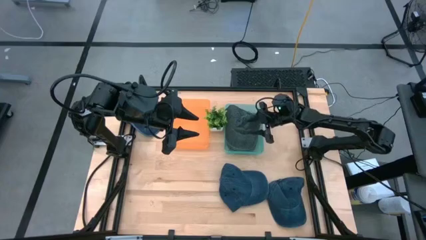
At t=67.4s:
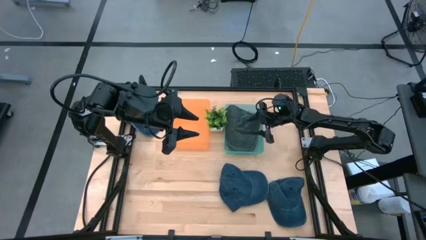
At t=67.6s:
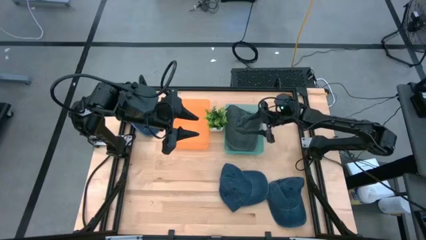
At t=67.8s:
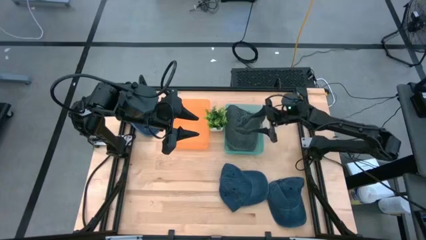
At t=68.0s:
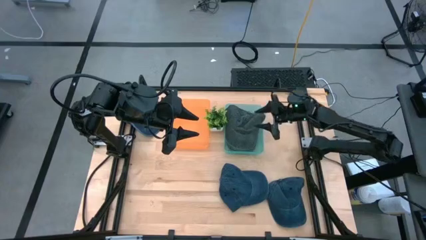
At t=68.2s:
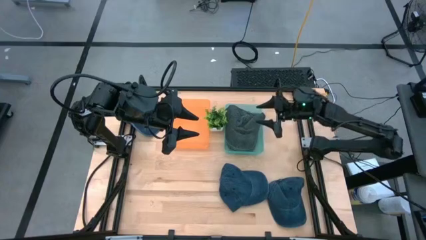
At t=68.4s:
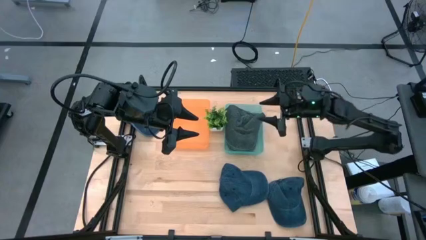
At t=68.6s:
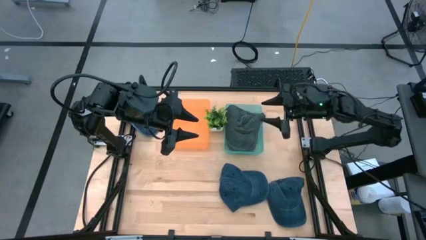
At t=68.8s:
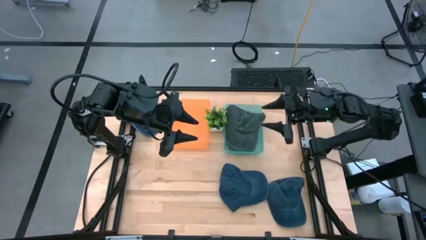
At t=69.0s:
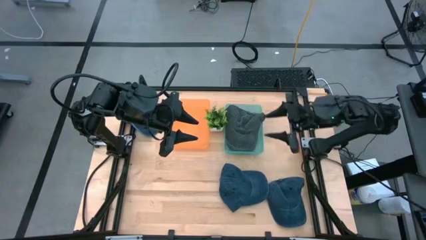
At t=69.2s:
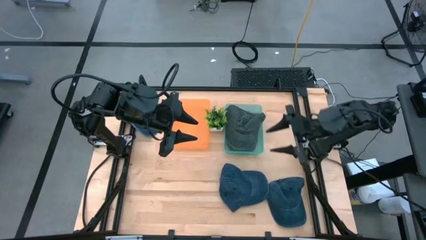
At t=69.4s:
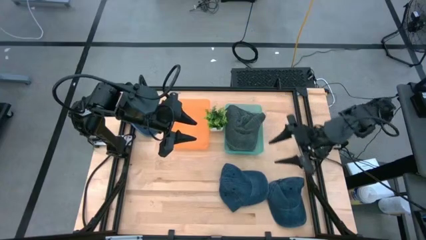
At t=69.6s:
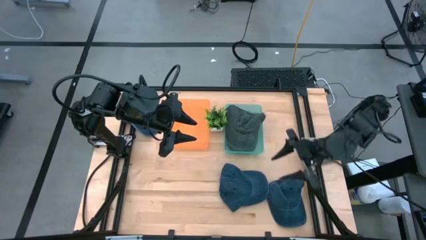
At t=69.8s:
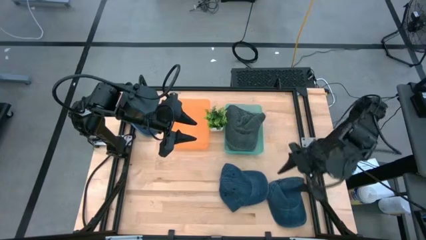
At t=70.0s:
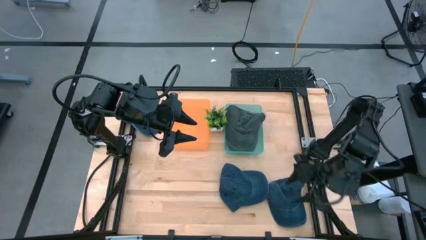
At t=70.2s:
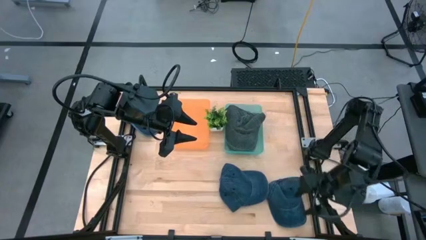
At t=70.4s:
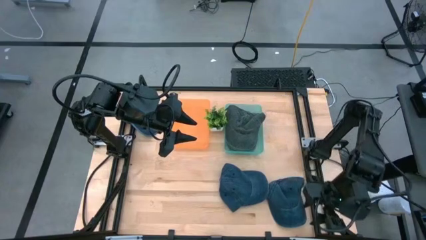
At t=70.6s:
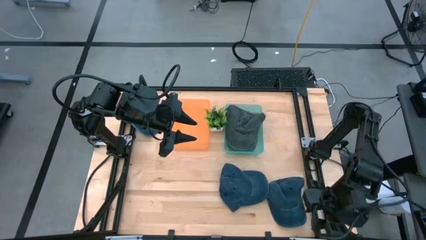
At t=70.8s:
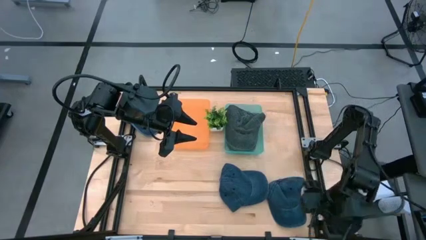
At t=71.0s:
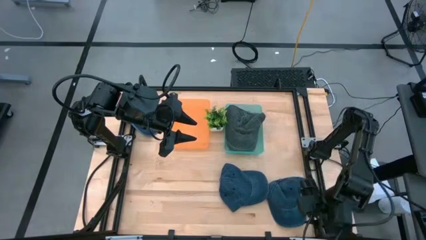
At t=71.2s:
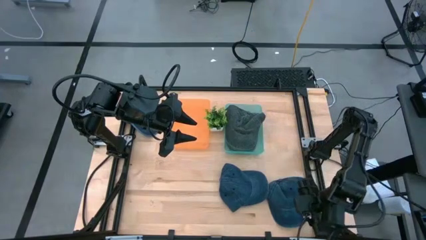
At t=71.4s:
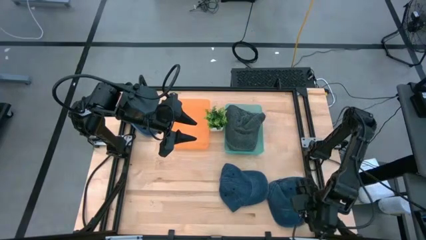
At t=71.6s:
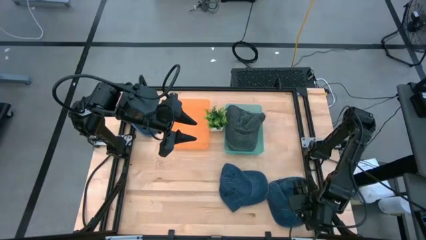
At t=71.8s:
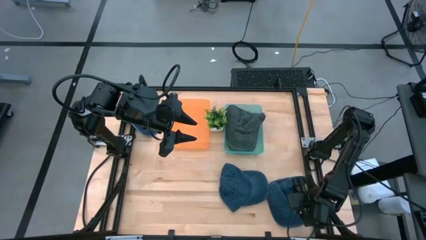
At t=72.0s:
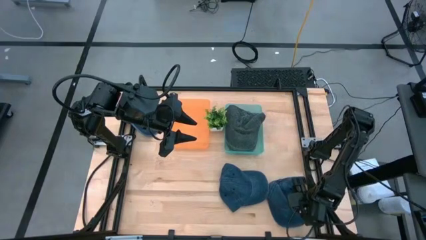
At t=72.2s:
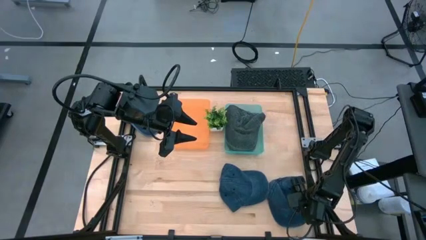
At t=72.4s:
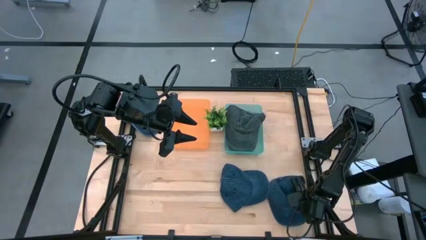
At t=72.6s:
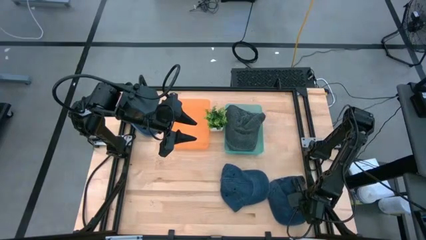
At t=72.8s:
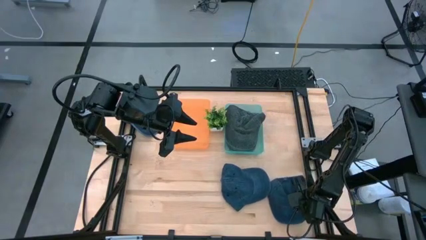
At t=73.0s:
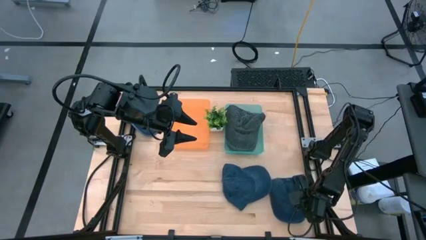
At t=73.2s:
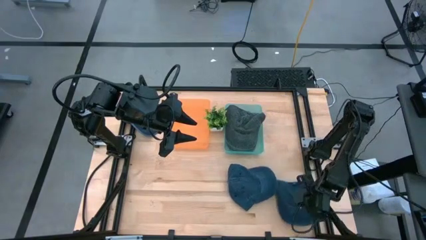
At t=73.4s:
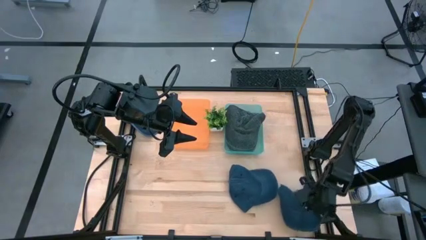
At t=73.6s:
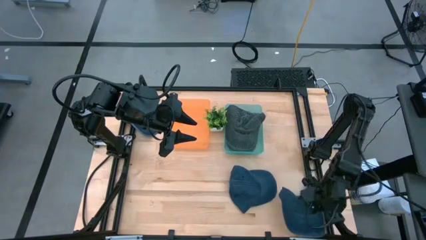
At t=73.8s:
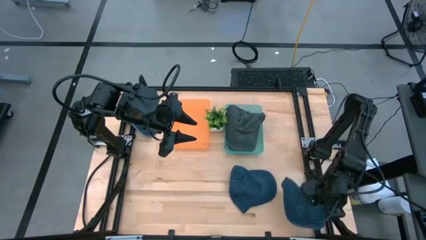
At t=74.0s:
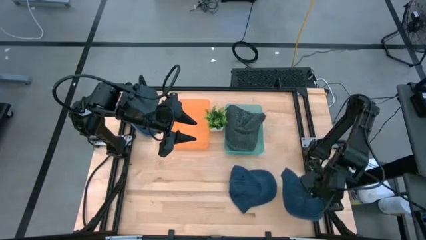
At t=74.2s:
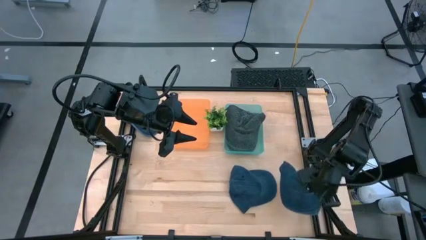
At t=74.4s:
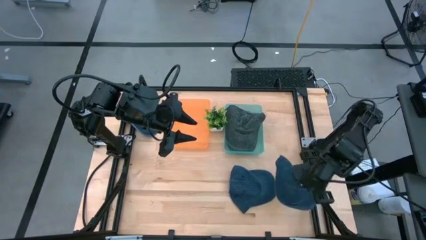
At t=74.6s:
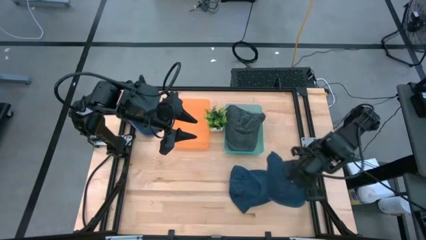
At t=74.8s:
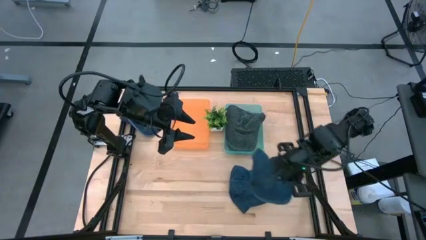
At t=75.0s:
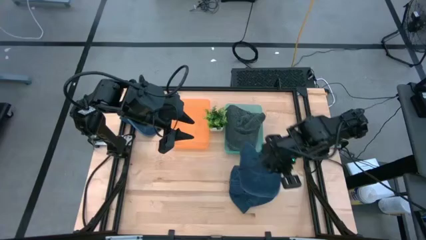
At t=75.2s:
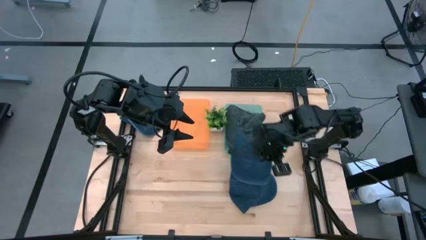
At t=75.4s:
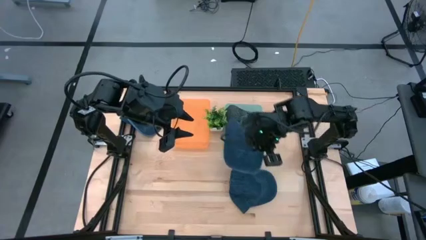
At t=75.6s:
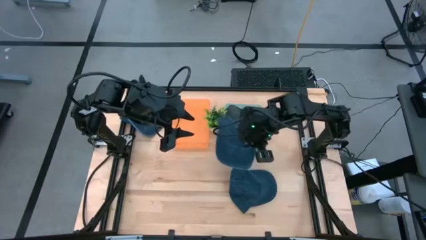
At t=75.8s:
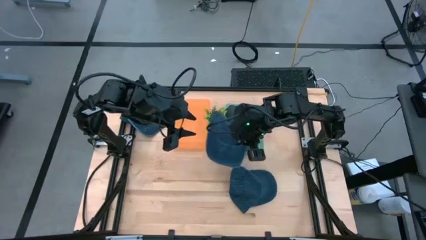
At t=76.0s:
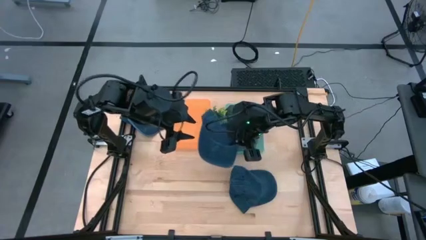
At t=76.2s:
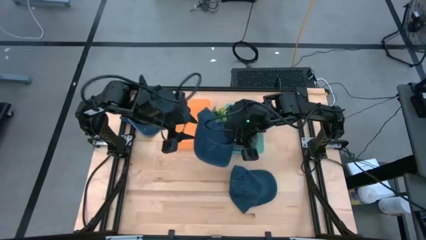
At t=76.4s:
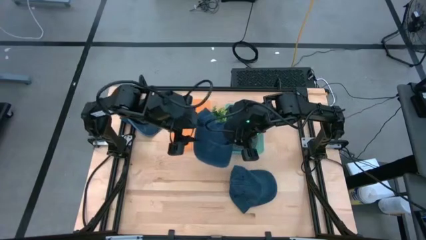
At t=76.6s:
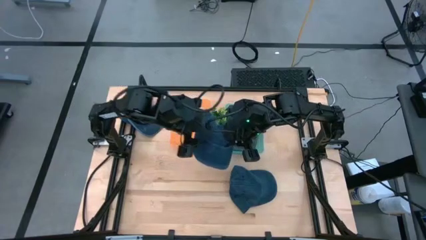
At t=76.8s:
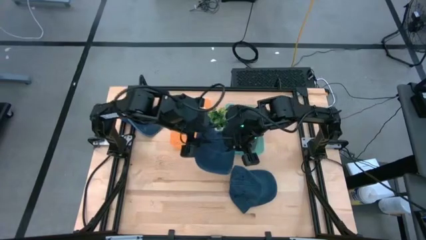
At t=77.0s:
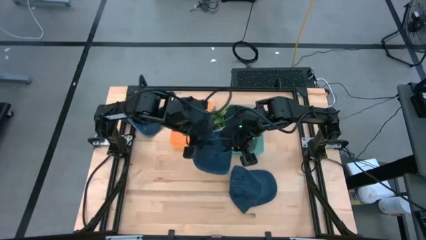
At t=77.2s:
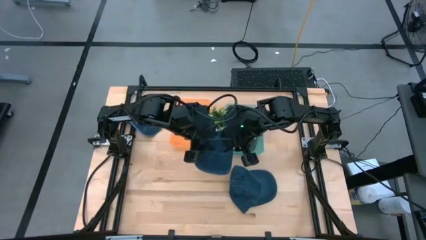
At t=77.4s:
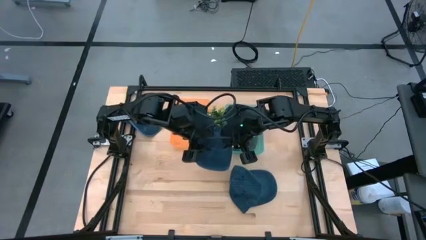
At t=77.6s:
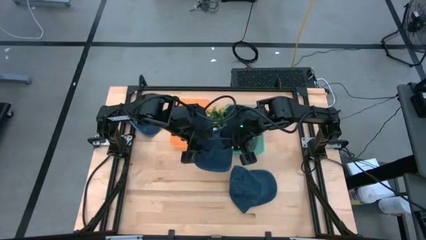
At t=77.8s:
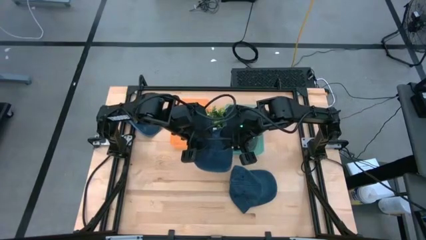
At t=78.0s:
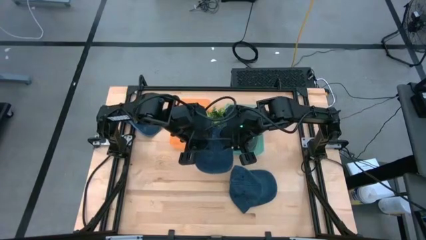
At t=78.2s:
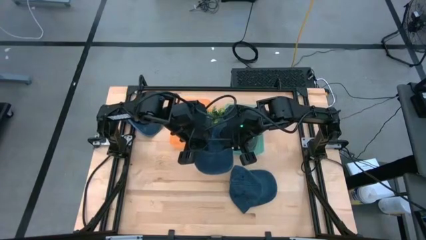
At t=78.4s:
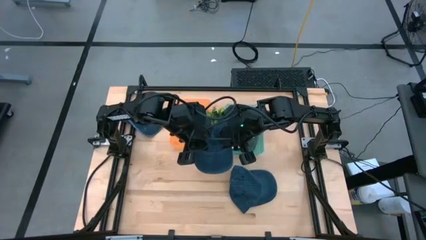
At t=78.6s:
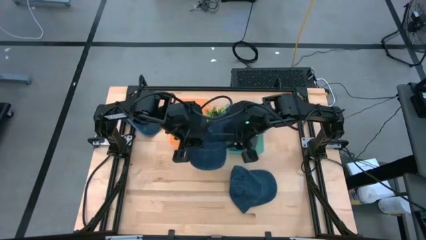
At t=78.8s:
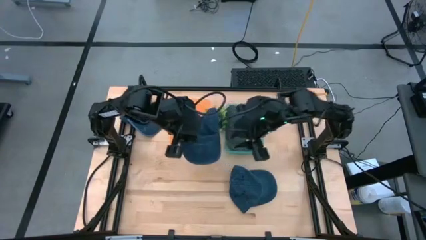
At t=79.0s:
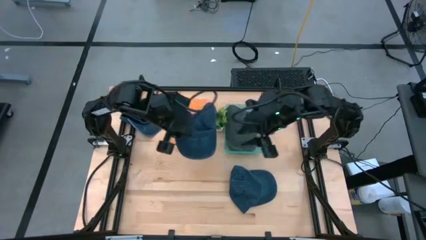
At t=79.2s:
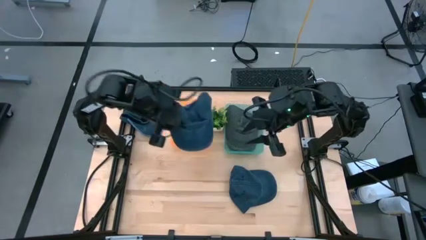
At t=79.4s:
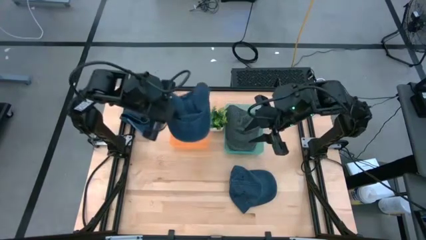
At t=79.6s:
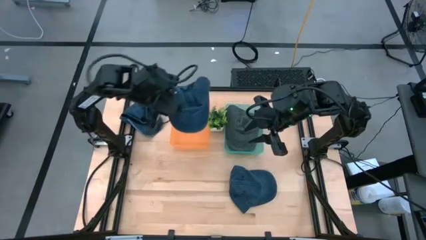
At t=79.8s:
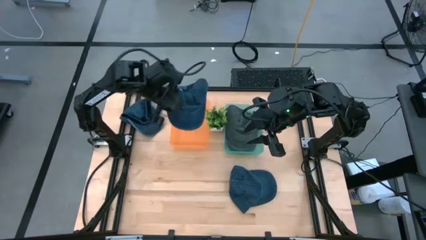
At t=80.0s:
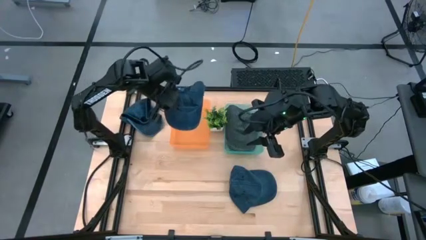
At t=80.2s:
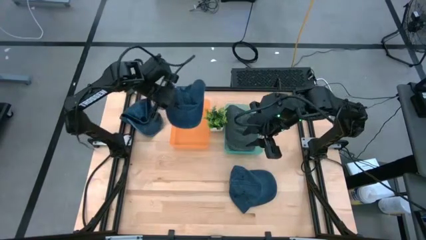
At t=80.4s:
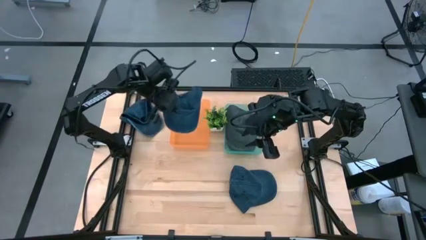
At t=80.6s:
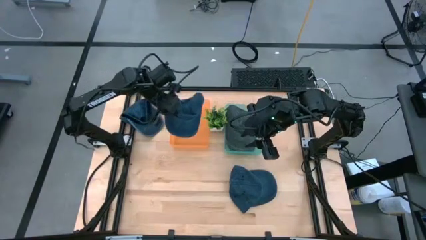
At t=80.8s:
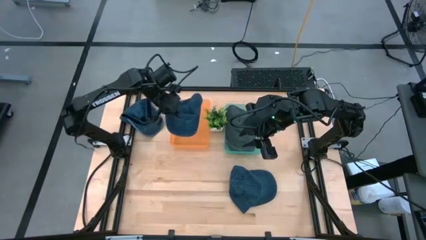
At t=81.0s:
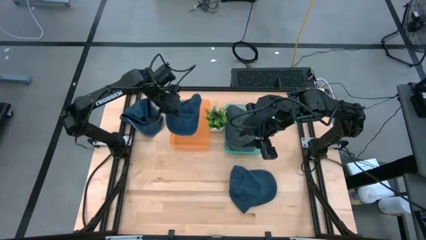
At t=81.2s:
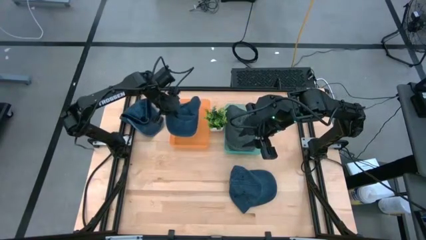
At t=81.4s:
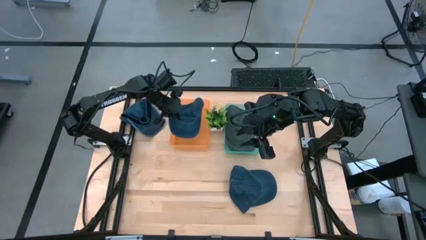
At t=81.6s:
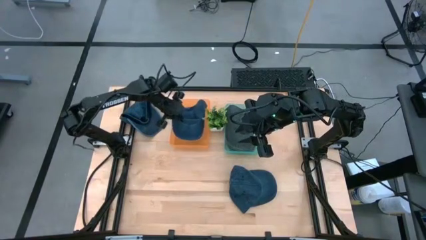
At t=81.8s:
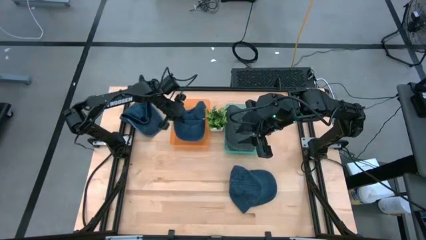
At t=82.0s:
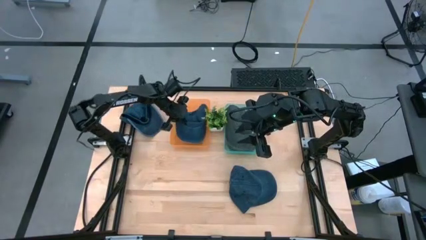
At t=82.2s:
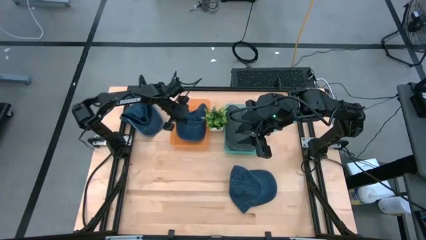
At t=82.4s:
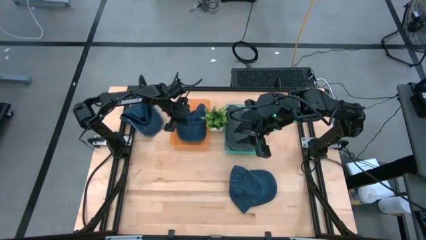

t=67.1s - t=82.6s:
Task: Pick & Place hat
Put the bottom right blue cap into the orange bin
